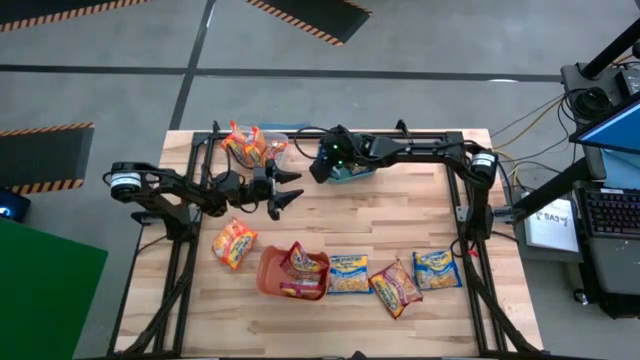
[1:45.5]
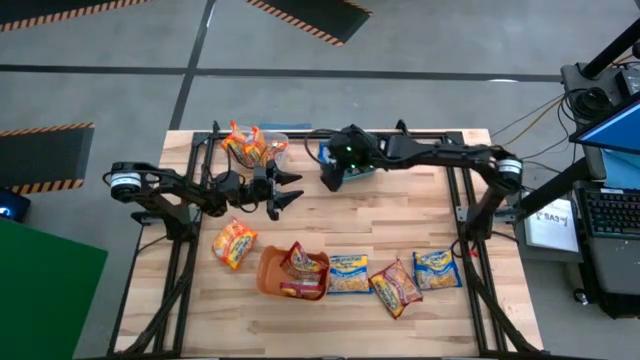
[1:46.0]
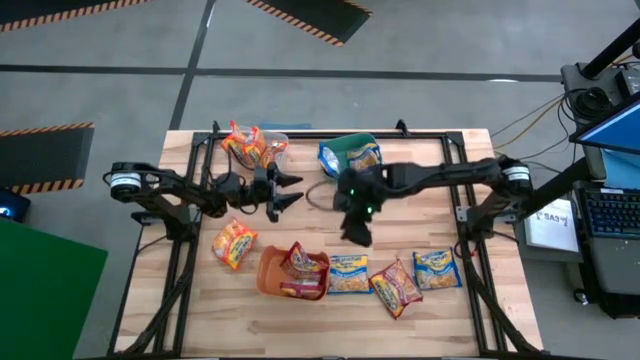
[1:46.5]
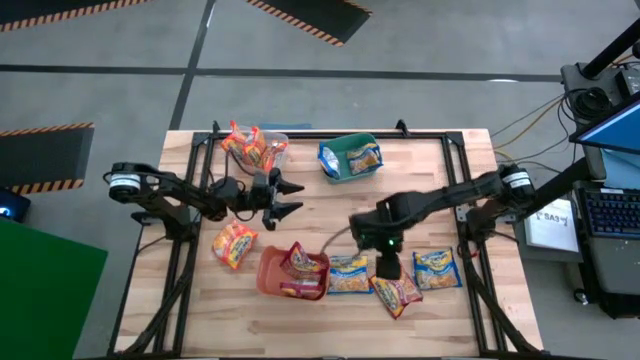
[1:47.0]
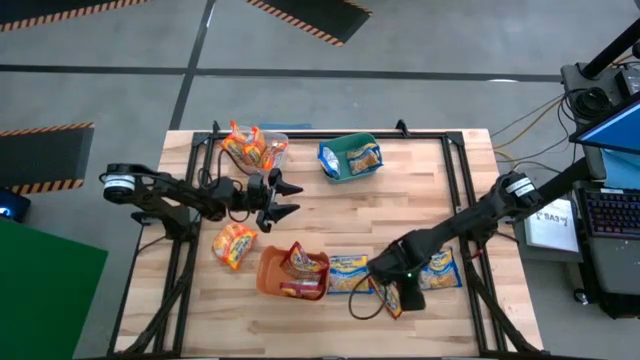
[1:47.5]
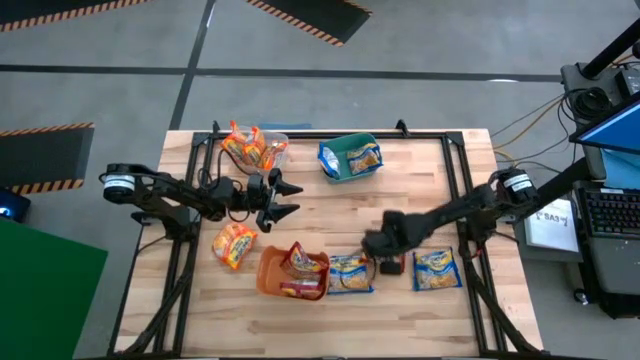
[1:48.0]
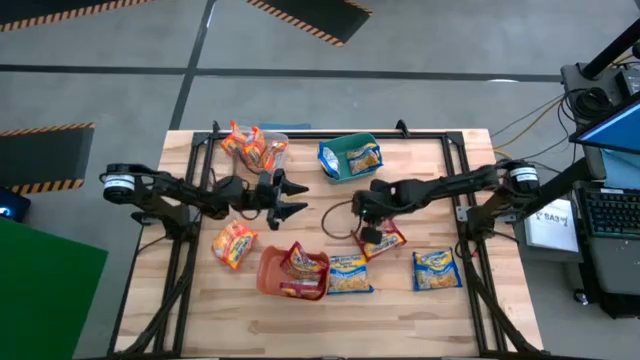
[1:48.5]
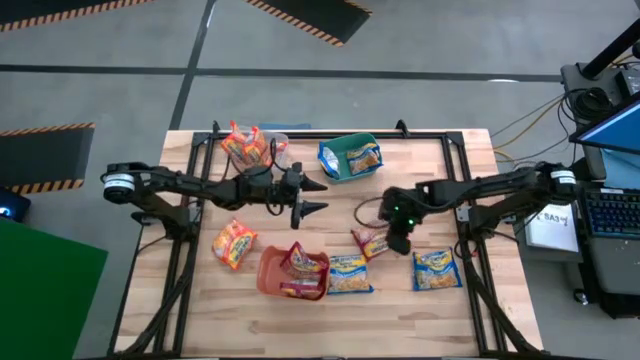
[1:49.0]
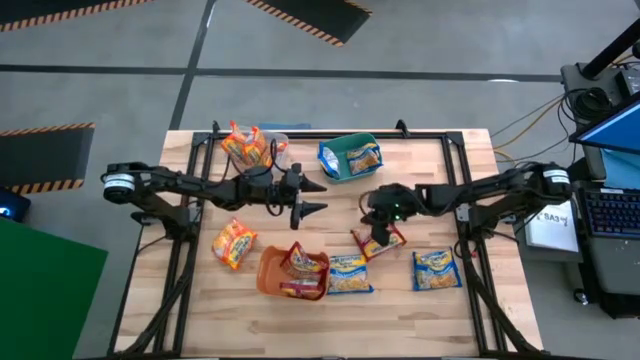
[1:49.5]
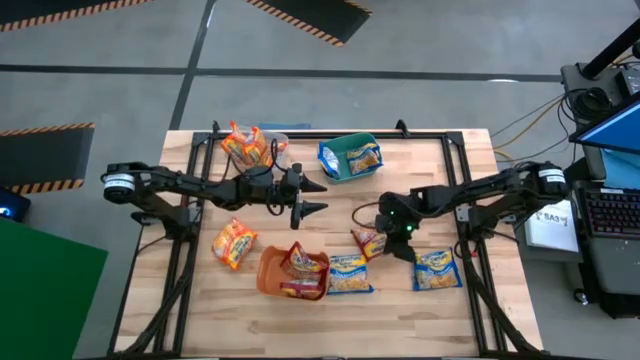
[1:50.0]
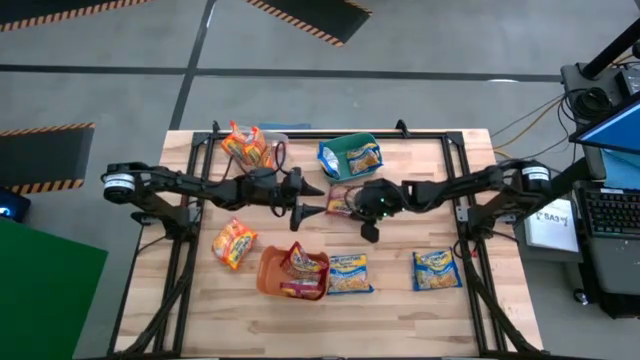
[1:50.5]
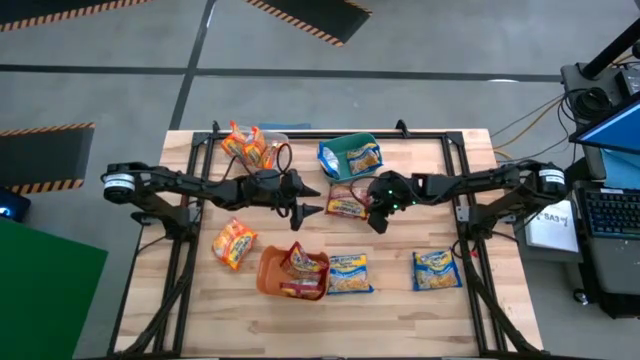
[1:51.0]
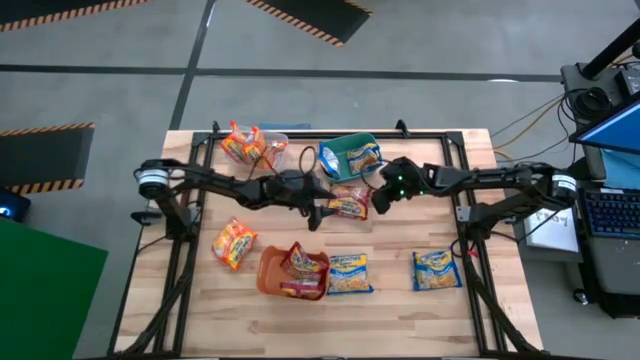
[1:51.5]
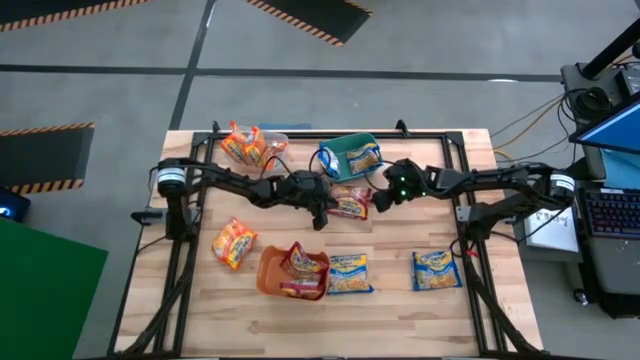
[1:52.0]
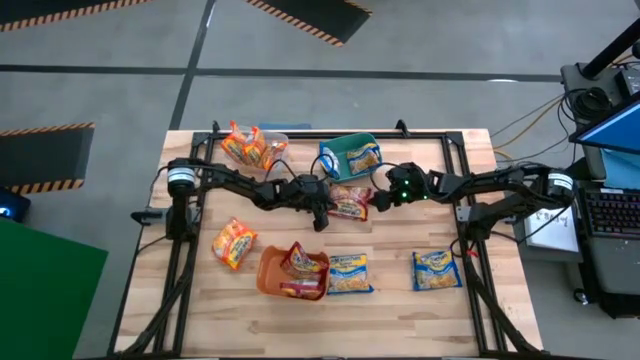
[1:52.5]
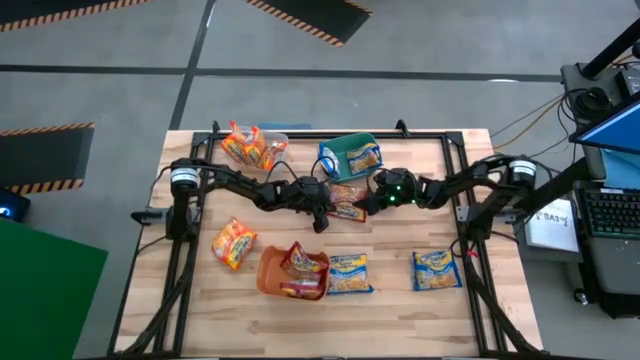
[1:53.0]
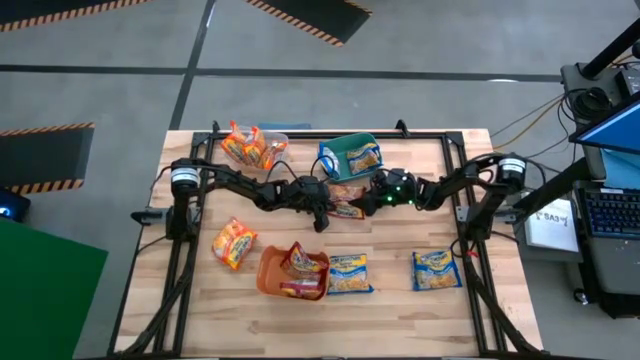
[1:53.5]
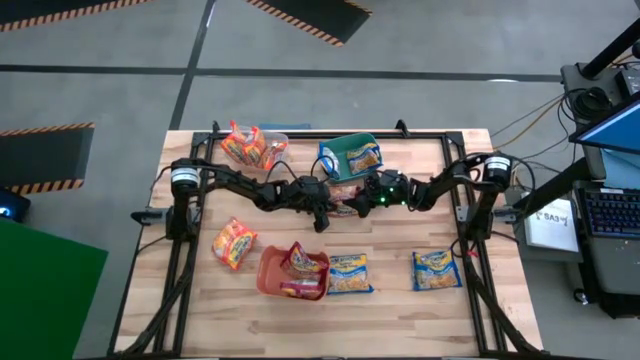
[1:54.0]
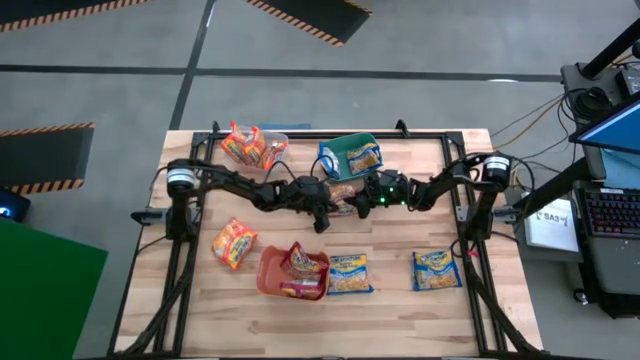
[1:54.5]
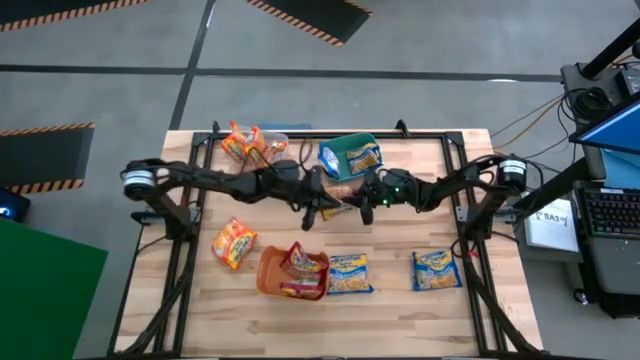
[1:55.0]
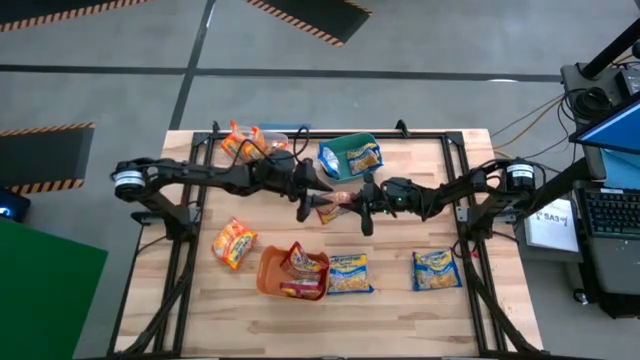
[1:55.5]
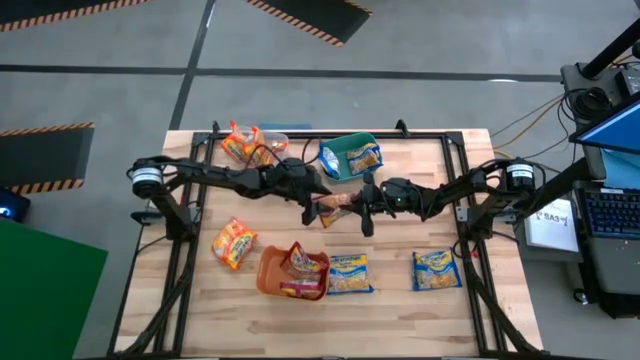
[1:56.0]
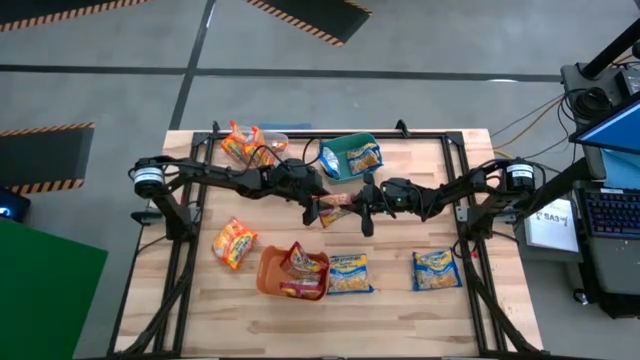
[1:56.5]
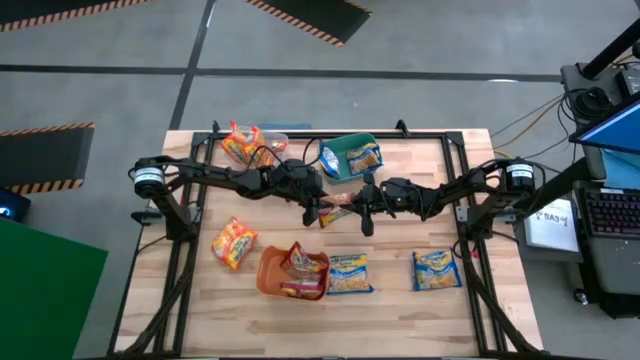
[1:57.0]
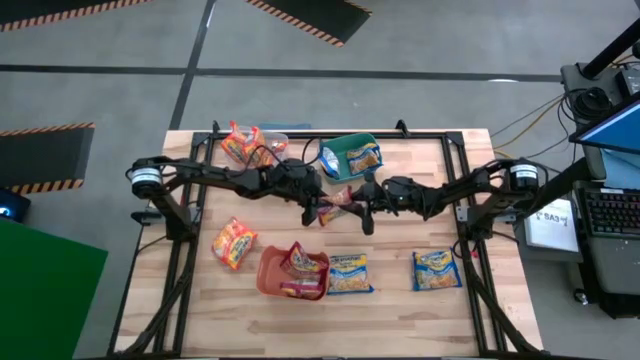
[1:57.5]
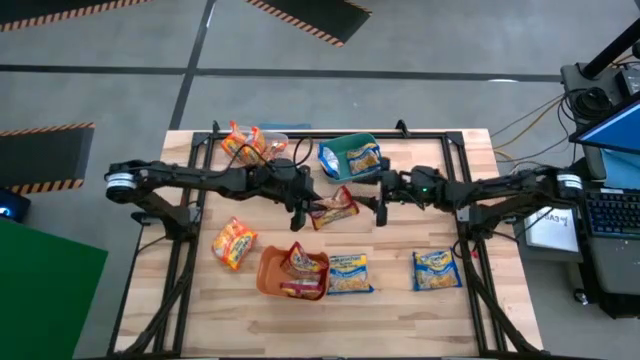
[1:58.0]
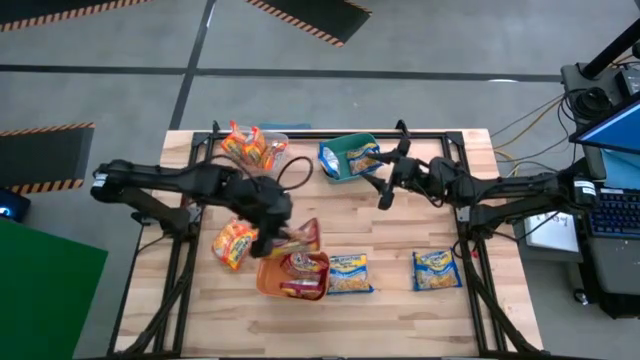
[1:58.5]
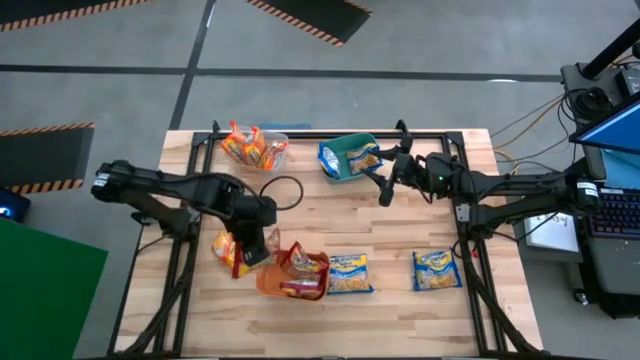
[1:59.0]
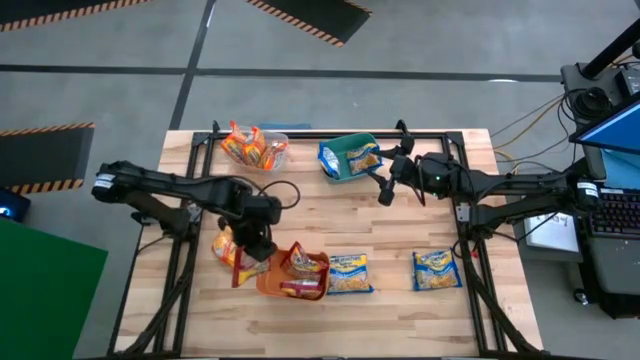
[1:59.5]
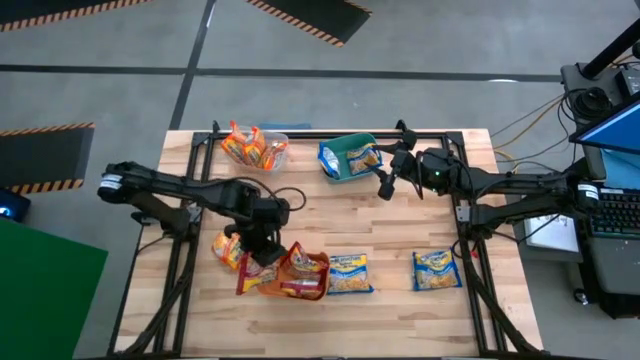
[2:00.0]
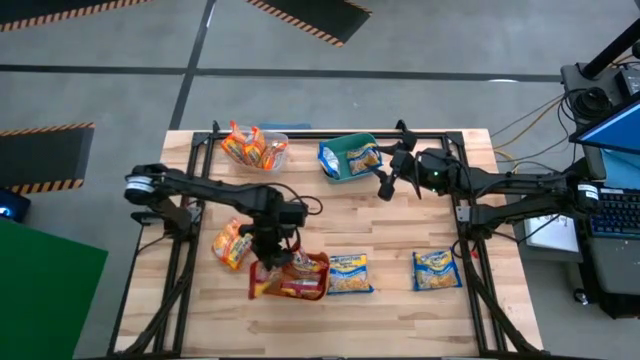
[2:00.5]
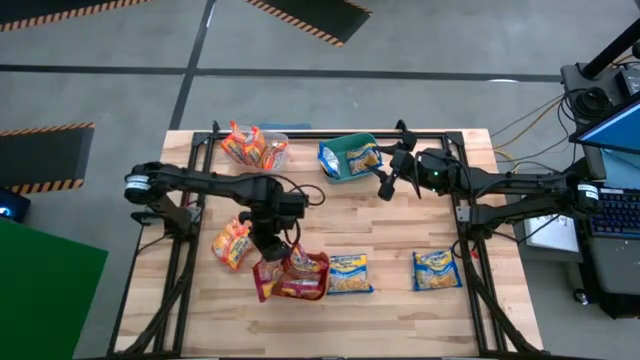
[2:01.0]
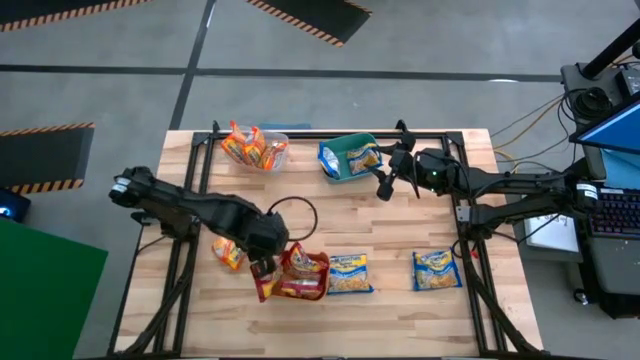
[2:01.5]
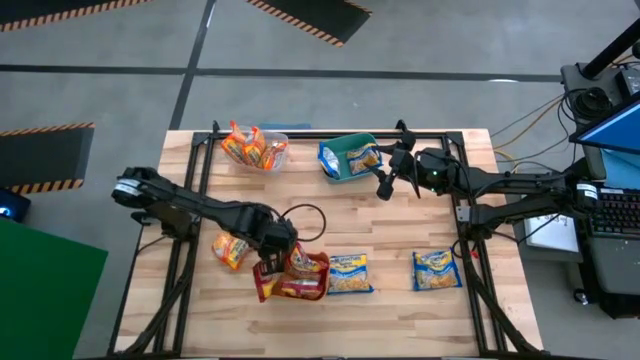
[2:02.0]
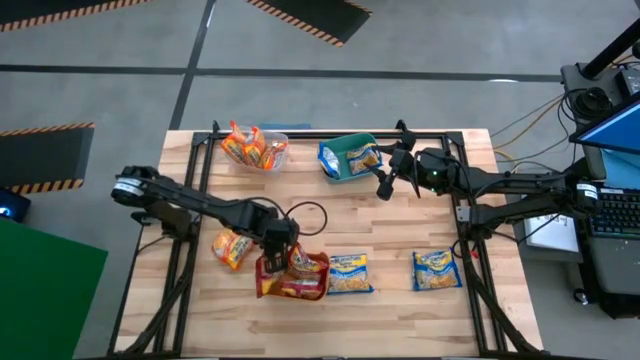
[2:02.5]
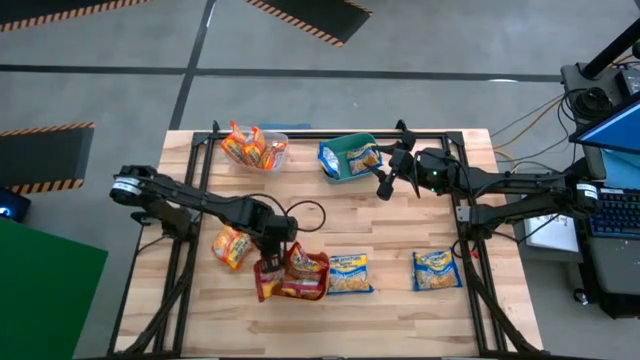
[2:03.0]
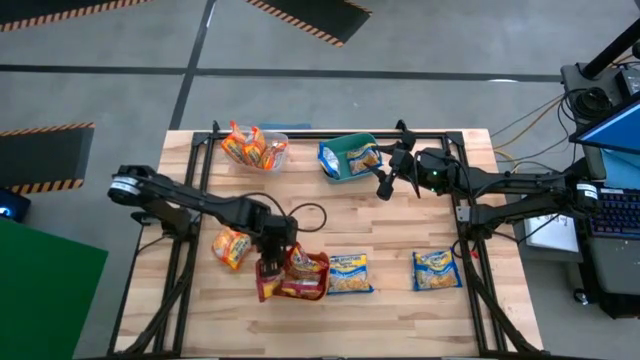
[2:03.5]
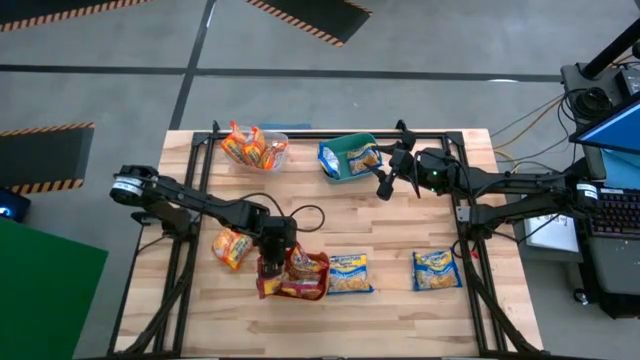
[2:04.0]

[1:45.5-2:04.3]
Task: Sort Maruchan noodles
Put the red noodle pack into the orange bin

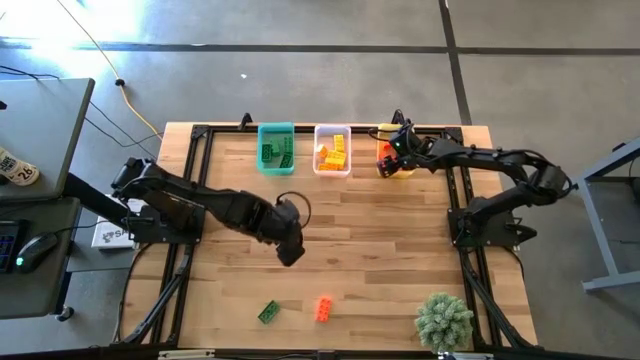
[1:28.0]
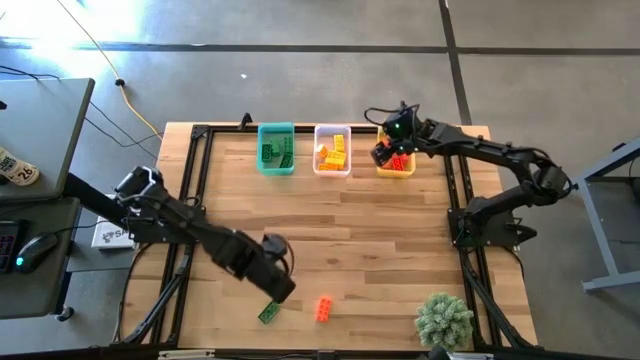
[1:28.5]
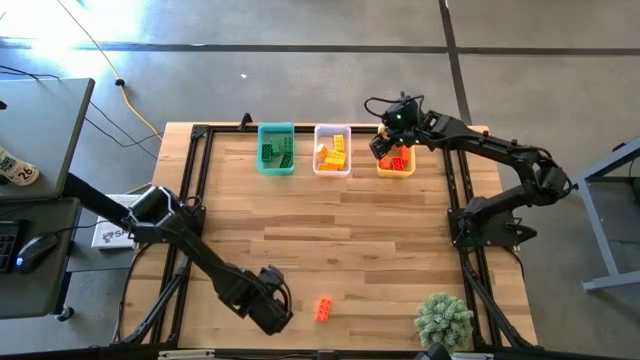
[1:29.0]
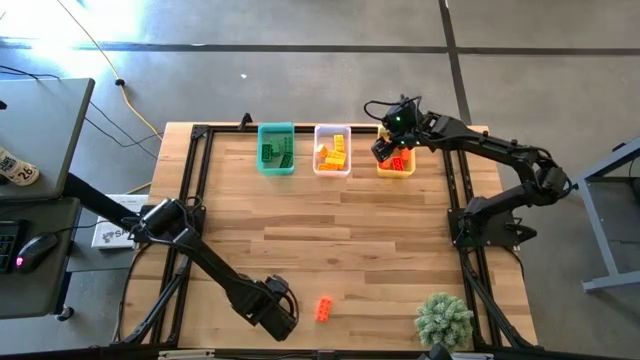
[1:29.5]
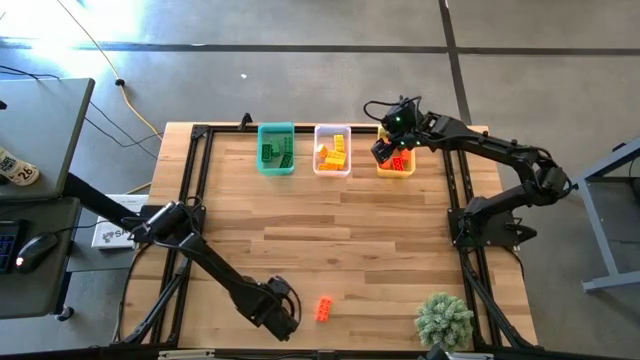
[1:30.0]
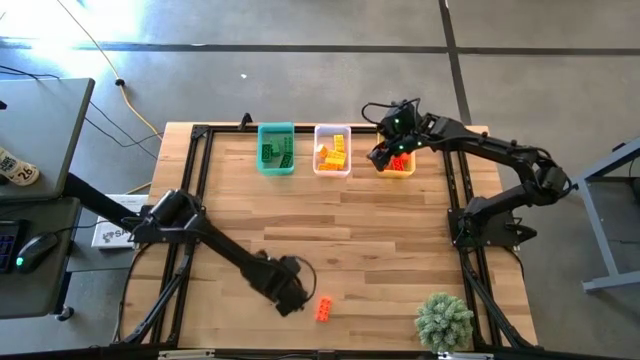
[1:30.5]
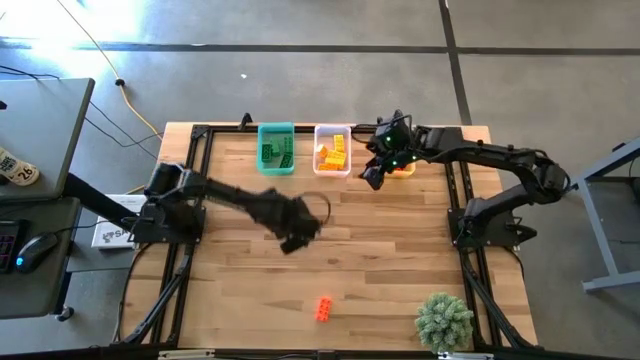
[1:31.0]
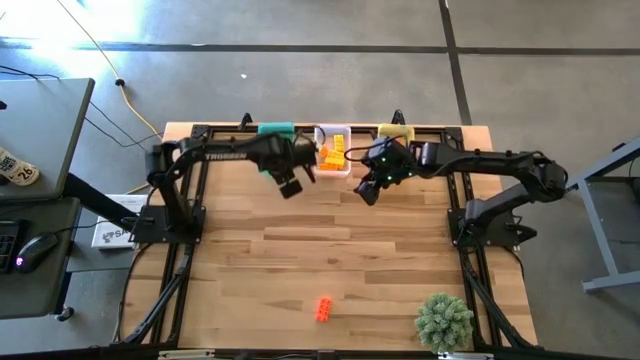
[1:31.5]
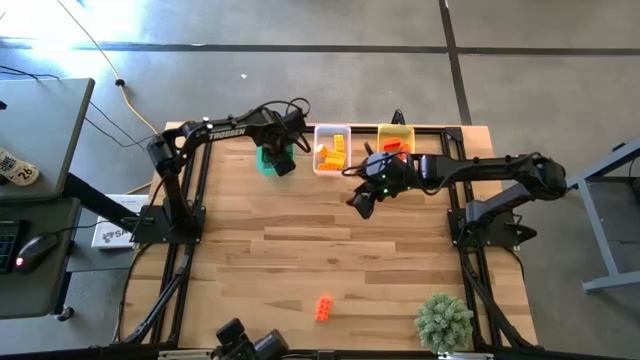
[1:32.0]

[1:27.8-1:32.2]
Task: Sort & place blocks by color
Put the green game piece into the green bin
